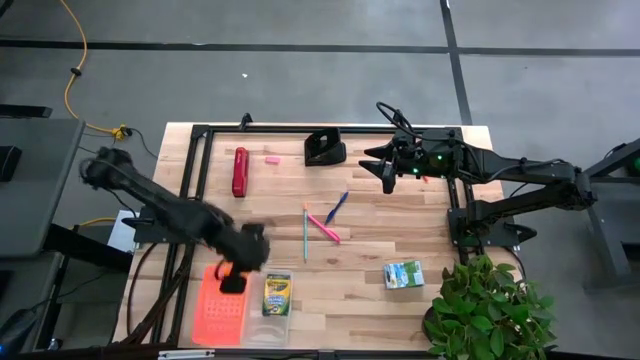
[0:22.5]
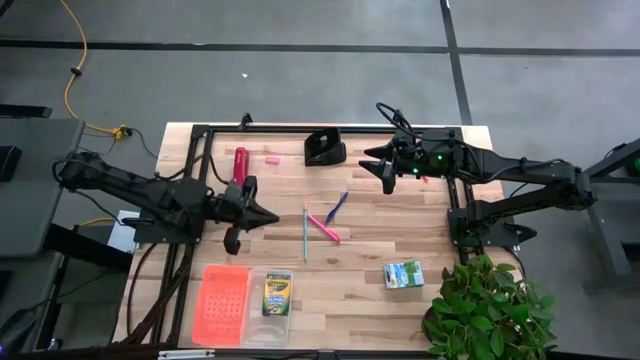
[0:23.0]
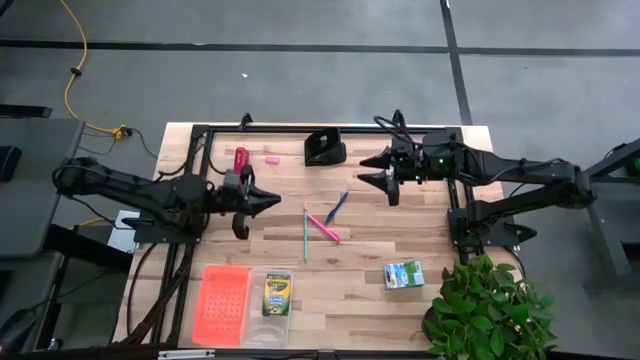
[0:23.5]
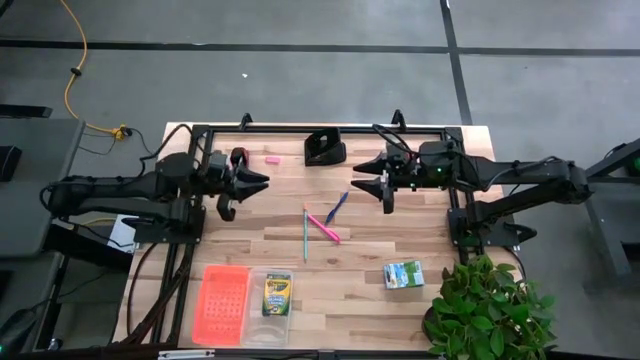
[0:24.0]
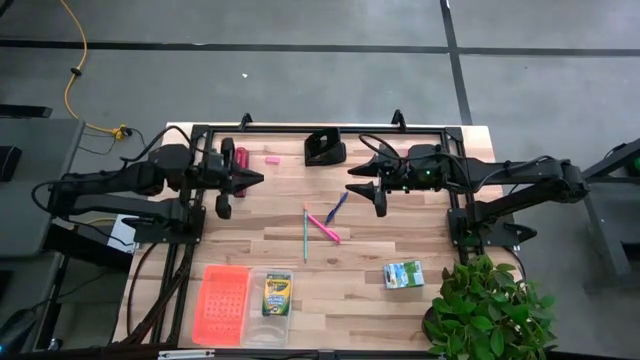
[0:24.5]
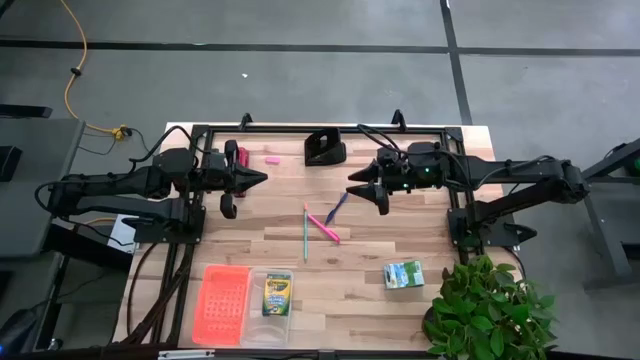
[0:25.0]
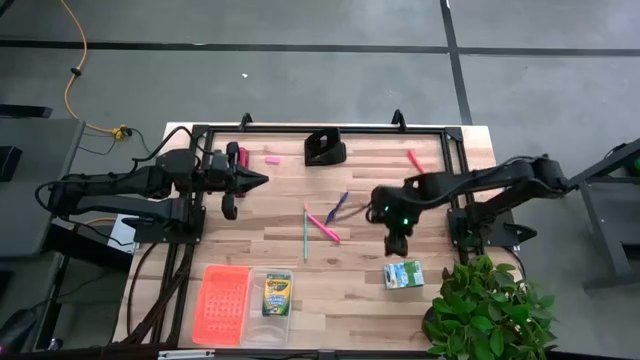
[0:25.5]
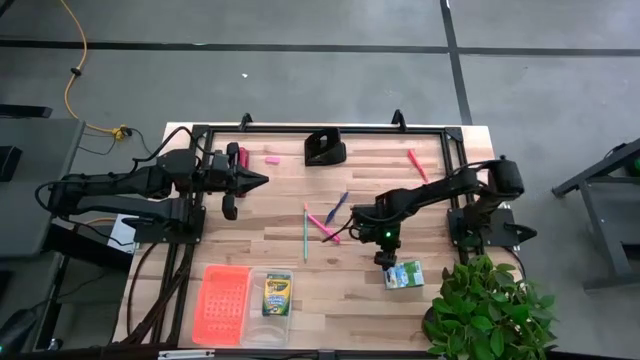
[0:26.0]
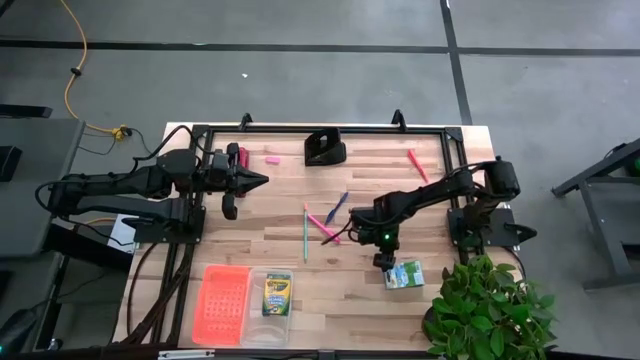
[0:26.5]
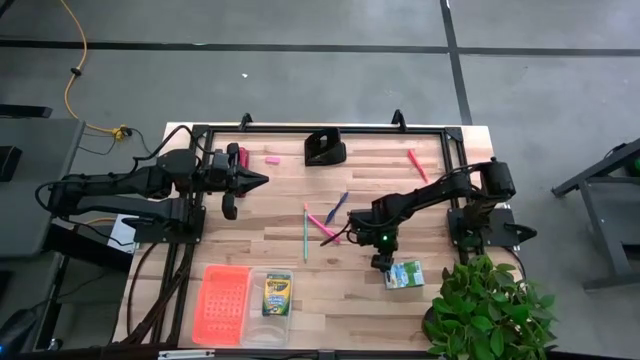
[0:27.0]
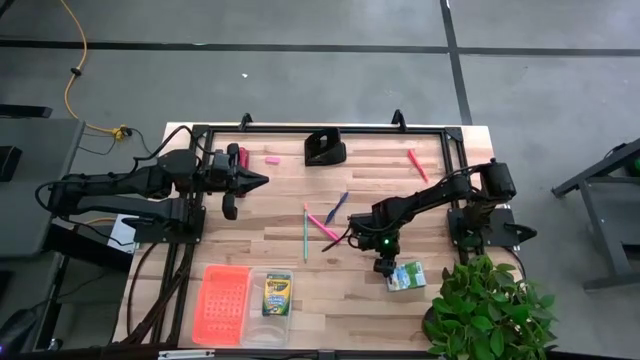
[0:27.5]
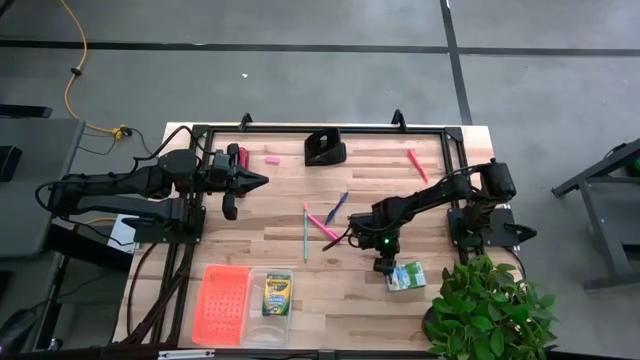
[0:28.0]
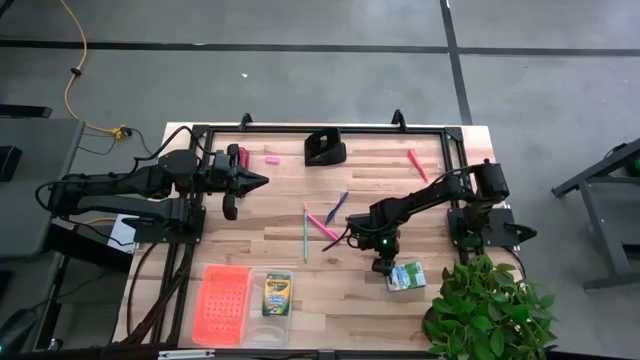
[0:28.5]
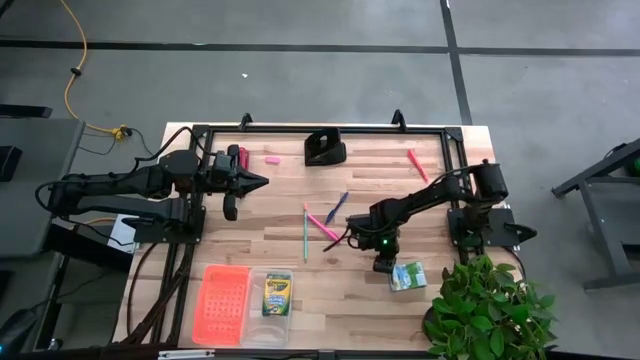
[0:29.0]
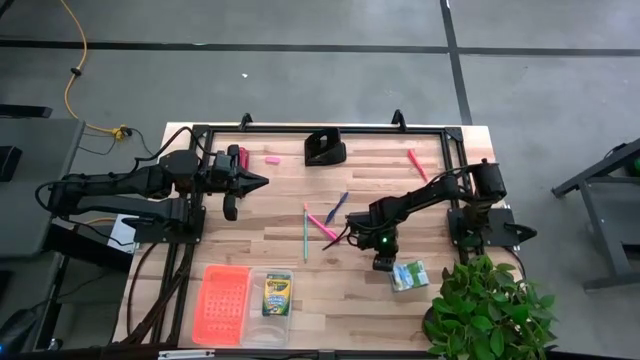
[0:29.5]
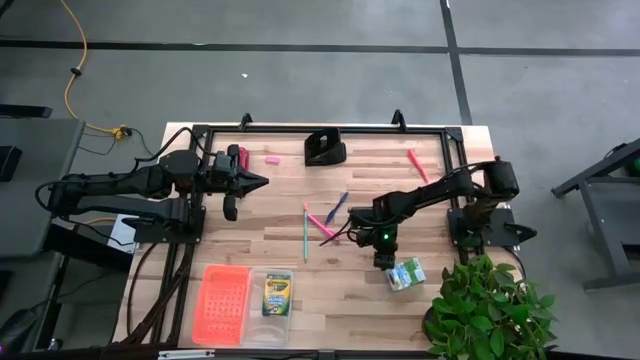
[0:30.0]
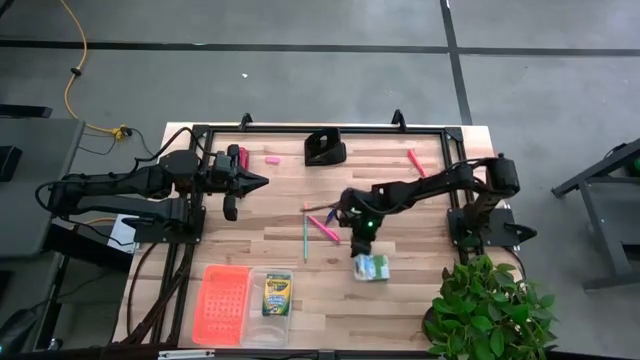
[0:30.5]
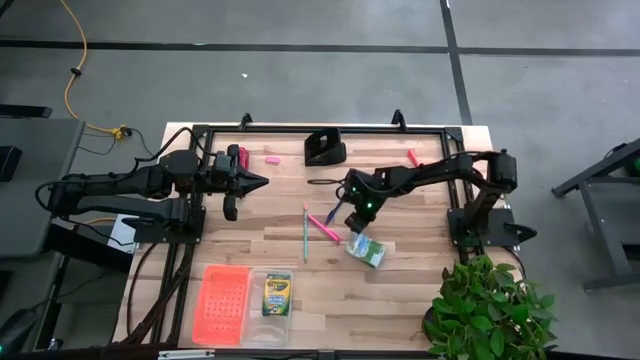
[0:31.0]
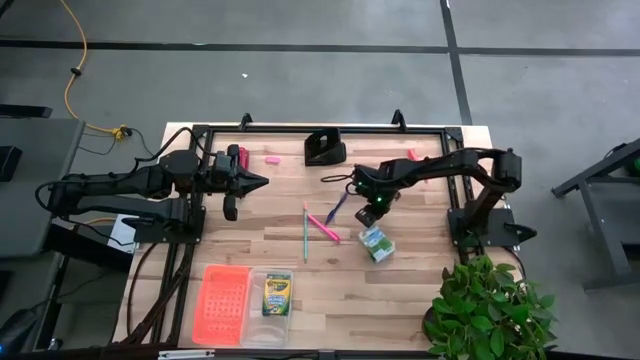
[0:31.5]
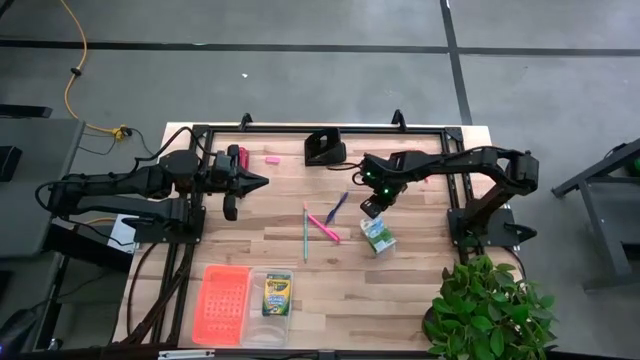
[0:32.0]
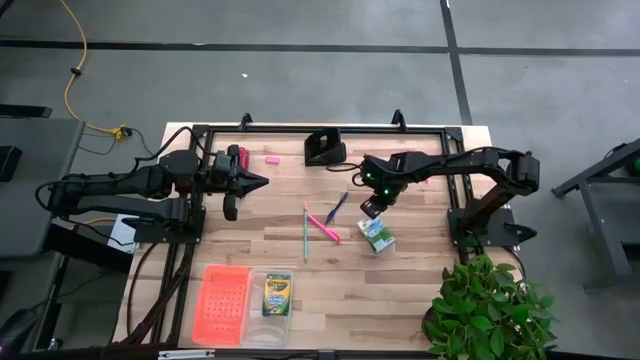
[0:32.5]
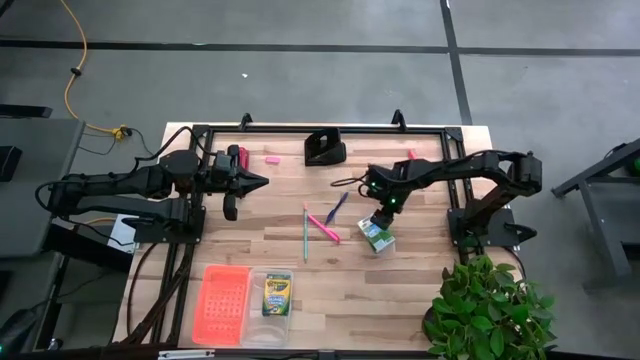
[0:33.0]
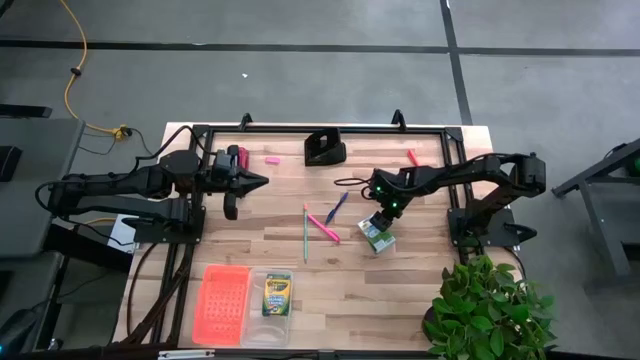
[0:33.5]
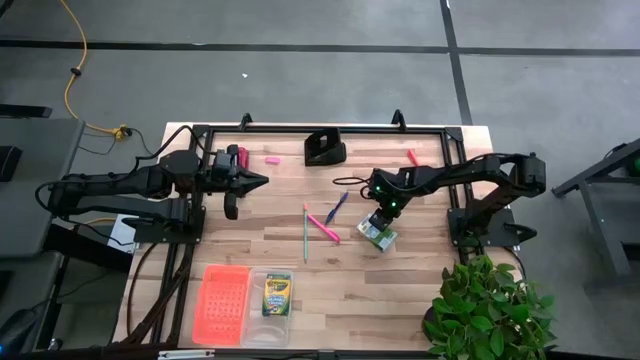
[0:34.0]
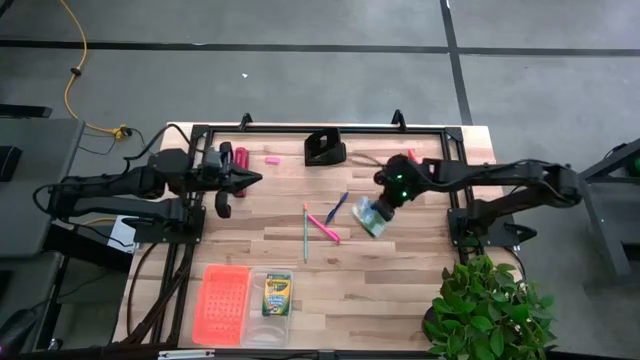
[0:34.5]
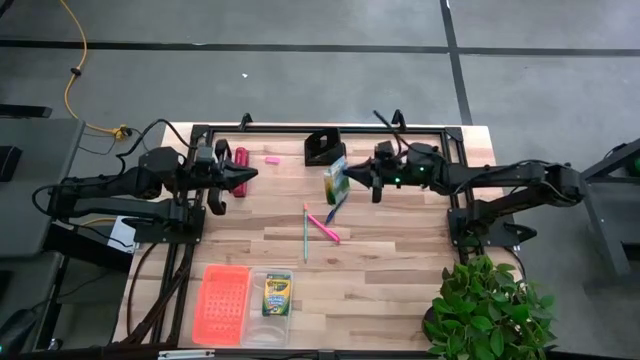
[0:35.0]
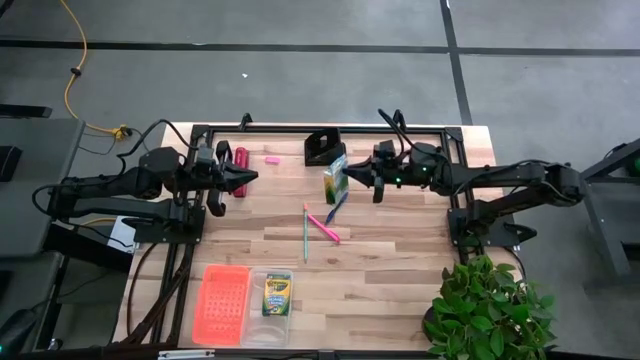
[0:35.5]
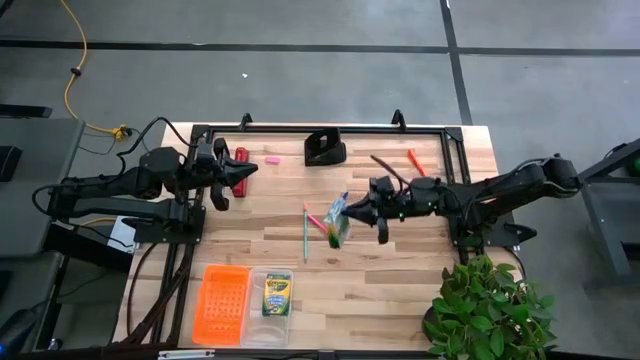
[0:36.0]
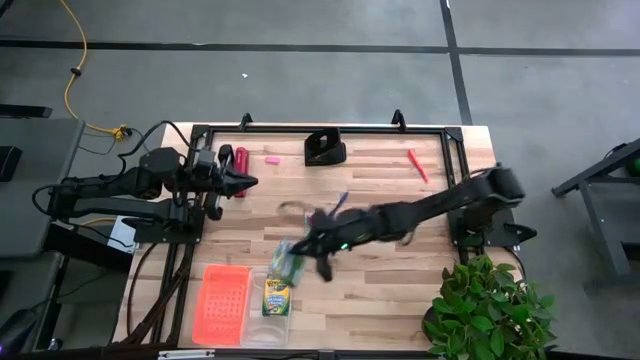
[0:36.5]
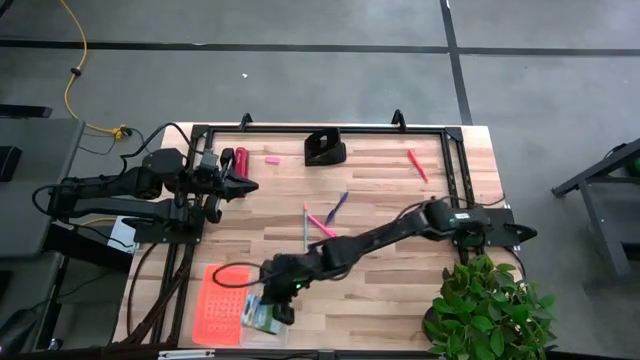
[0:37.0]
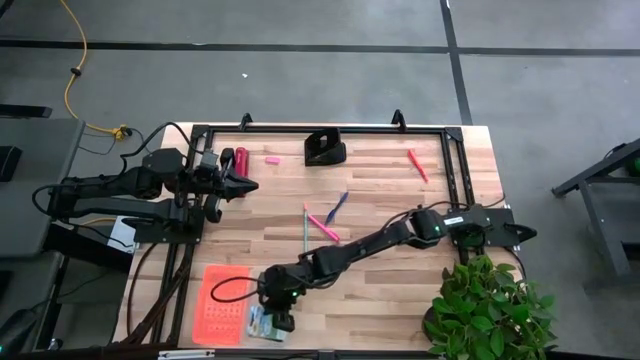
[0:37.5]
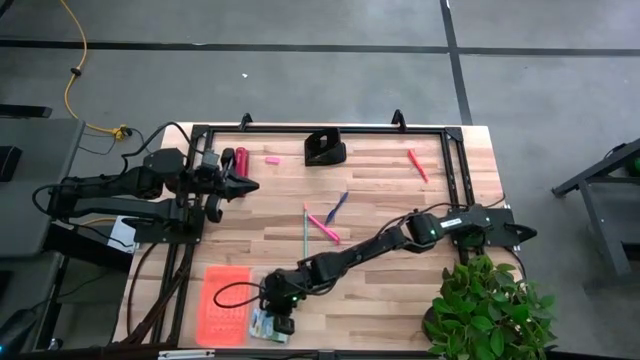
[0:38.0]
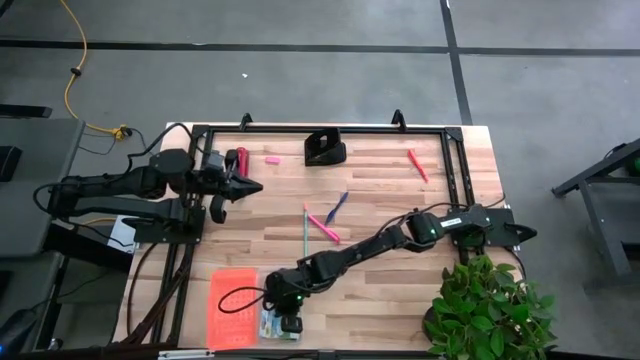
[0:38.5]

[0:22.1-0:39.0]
Task: Pack school essentials
Put the crayon box into the supply box

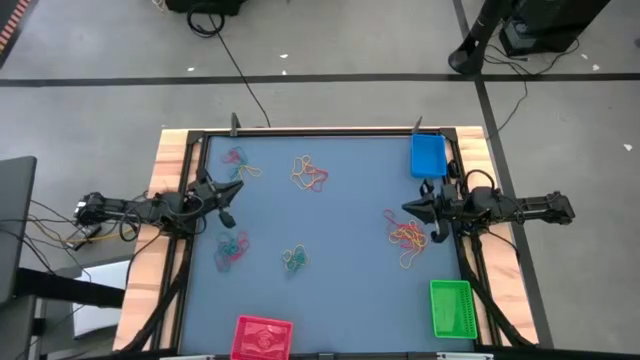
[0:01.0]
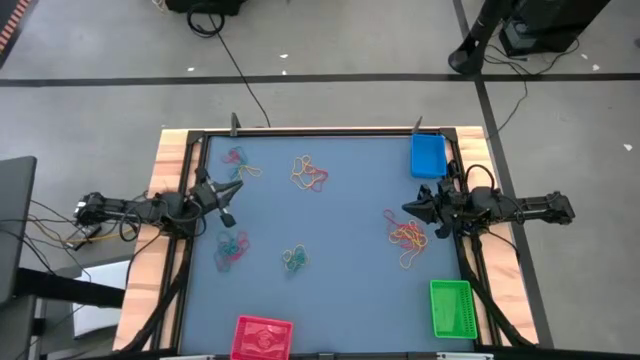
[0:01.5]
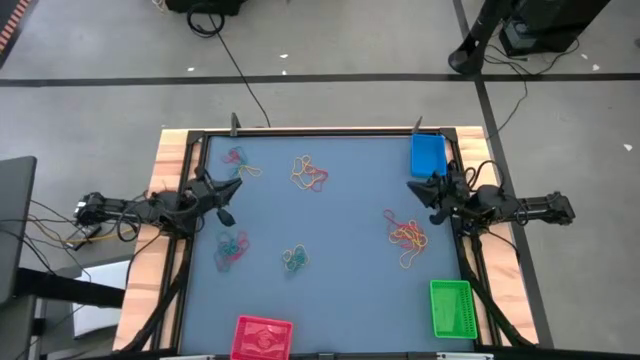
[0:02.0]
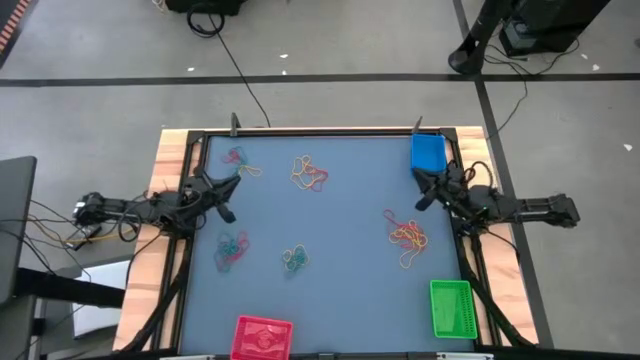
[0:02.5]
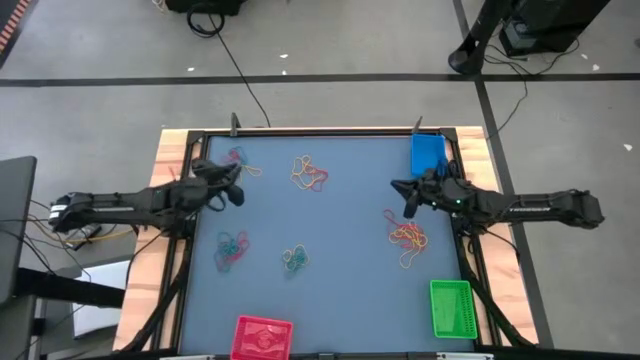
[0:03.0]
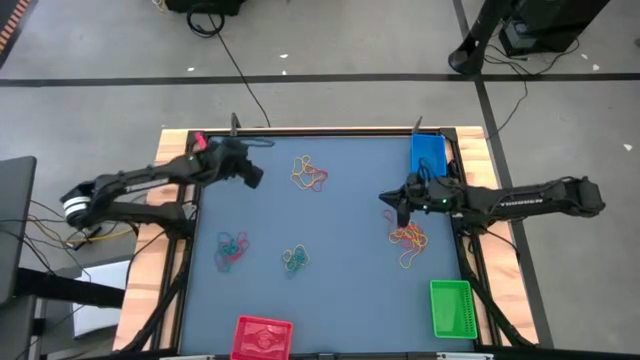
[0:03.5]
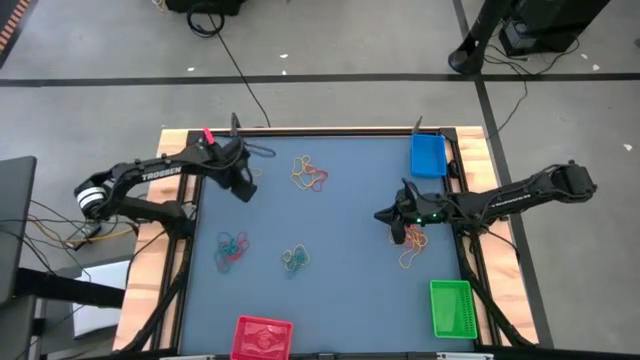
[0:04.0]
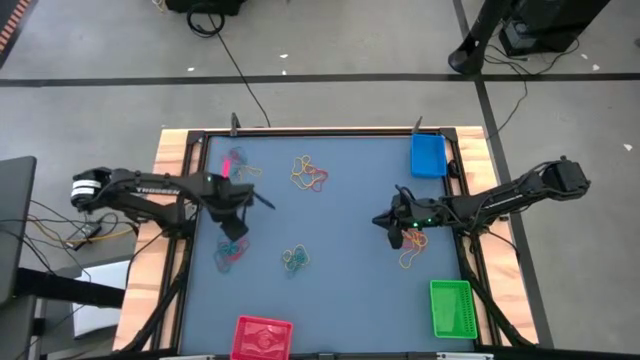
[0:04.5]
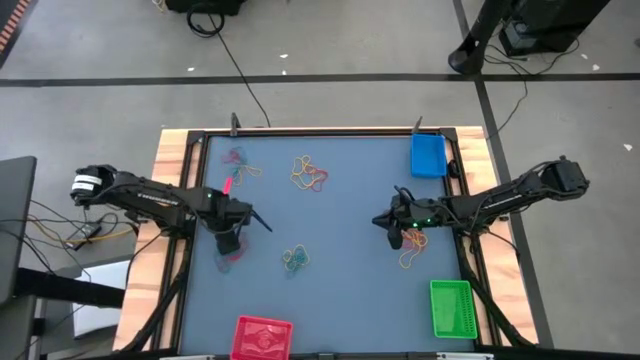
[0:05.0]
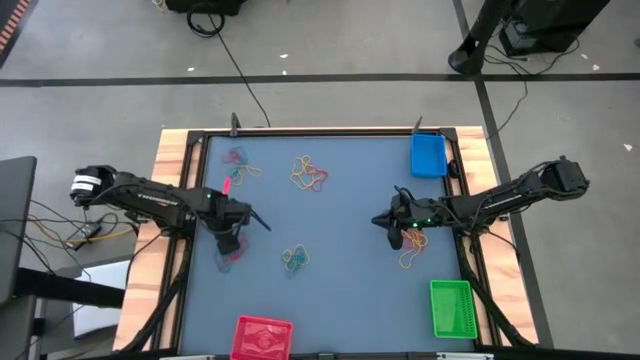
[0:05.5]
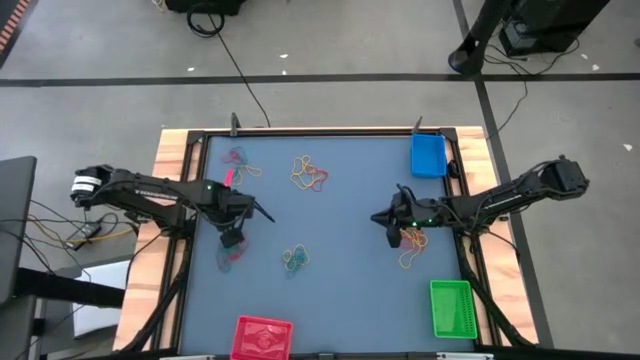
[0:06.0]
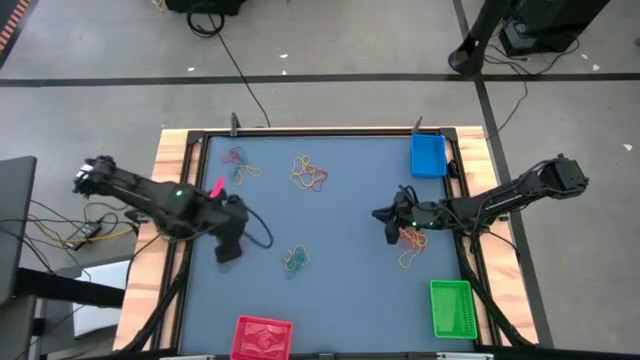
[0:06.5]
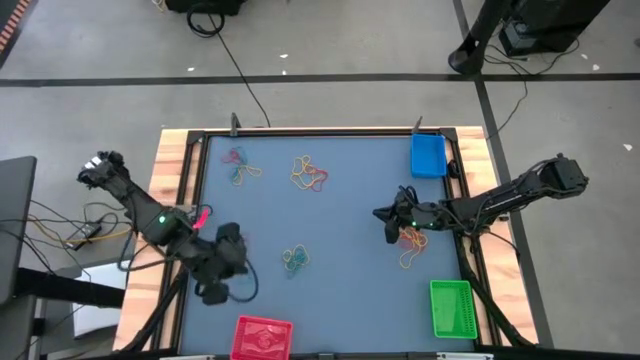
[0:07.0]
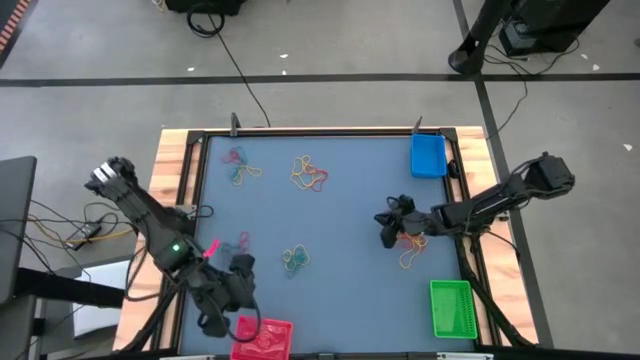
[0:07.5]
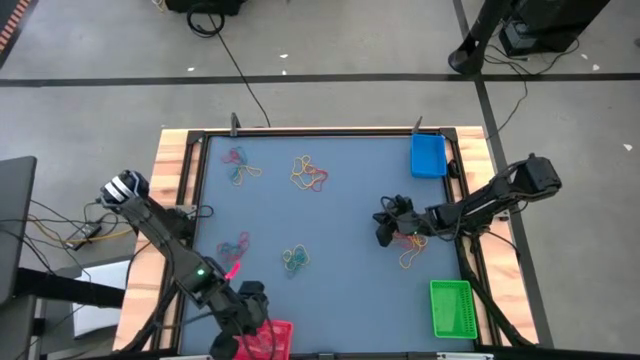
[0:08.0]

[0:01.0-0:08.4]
Task: Sort rubber bands into baskets
Put the blue rubber band into the red bin
